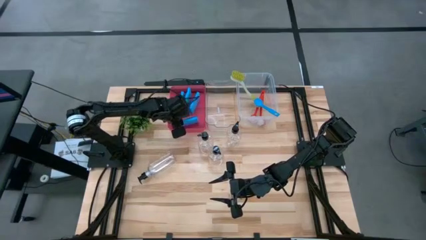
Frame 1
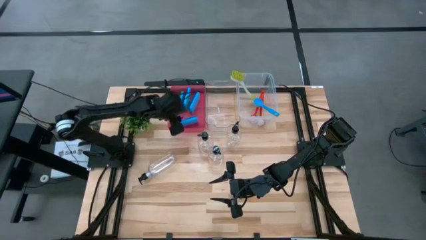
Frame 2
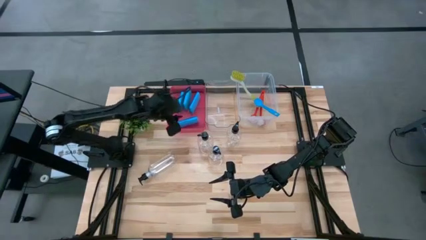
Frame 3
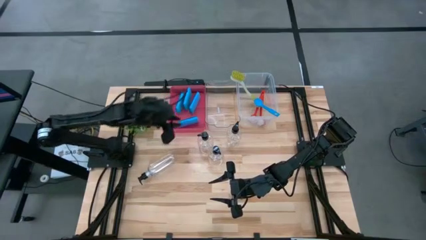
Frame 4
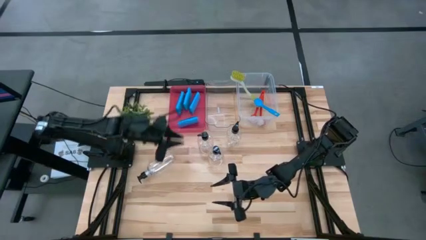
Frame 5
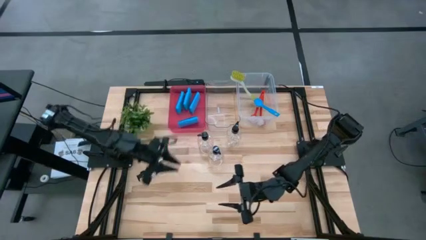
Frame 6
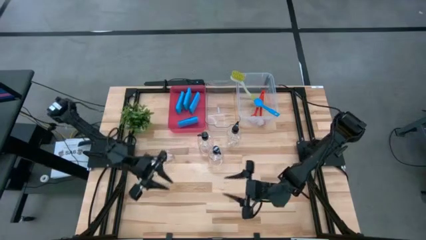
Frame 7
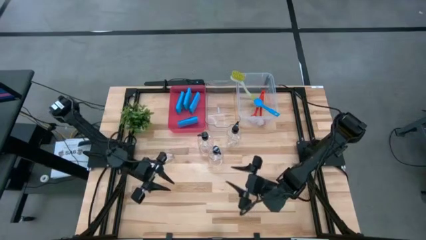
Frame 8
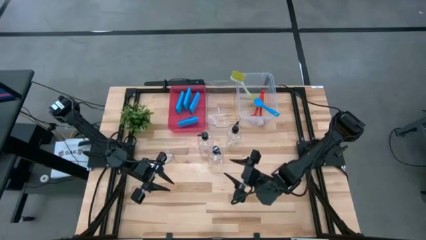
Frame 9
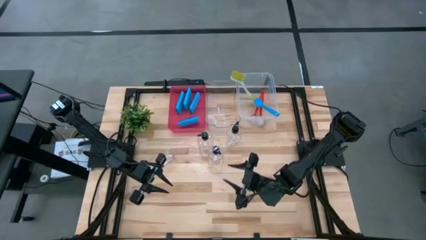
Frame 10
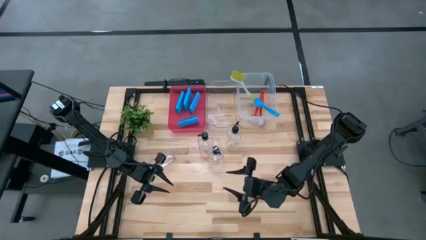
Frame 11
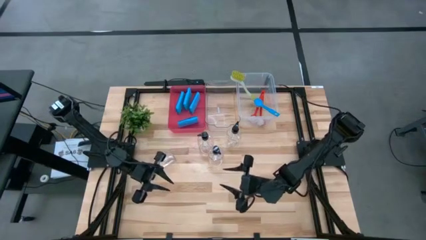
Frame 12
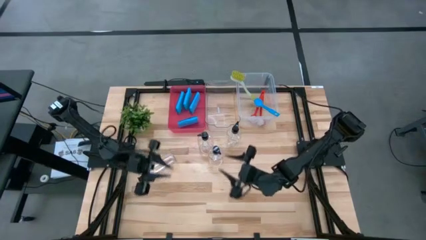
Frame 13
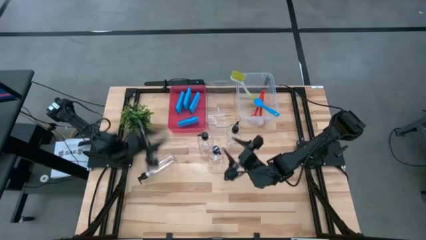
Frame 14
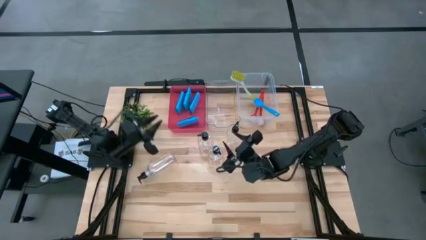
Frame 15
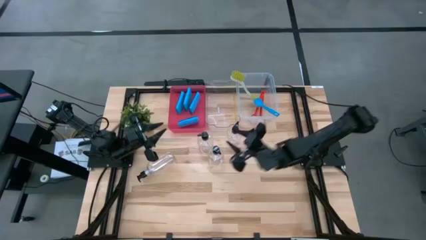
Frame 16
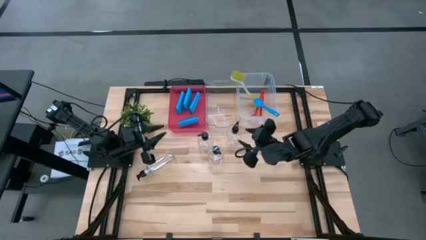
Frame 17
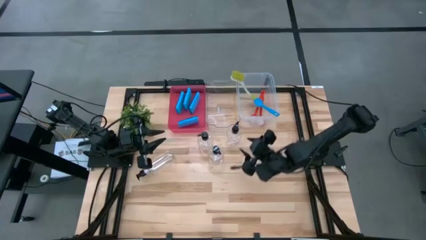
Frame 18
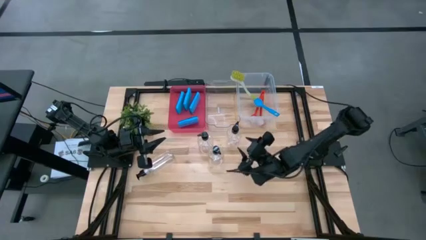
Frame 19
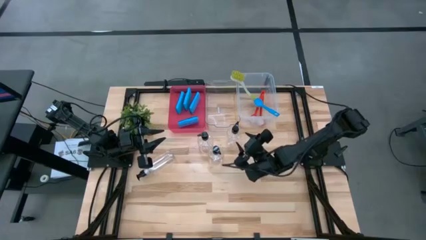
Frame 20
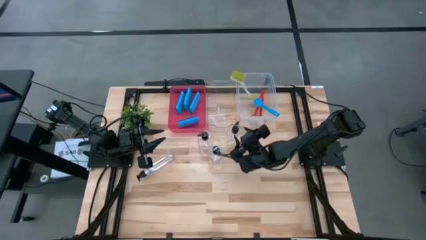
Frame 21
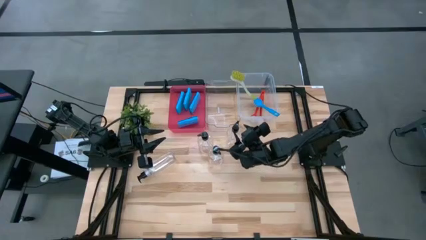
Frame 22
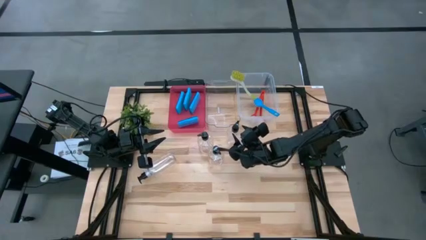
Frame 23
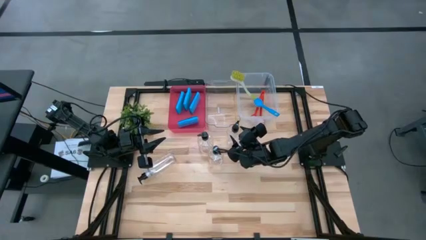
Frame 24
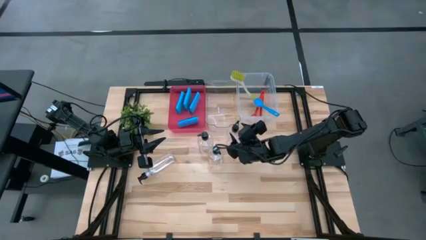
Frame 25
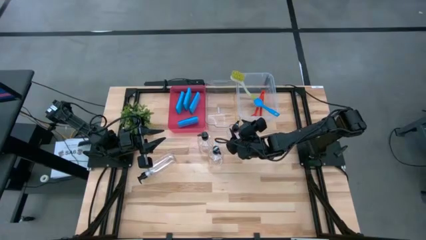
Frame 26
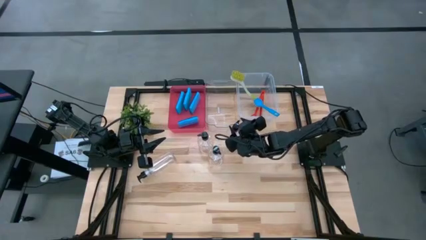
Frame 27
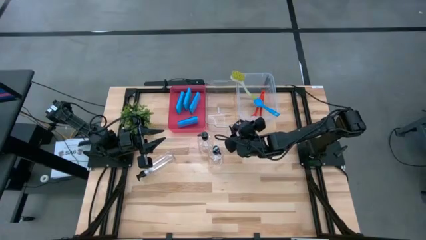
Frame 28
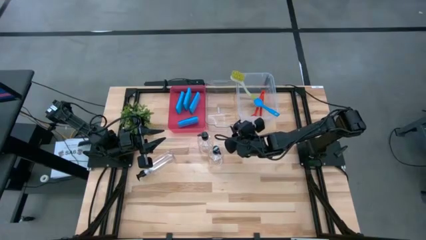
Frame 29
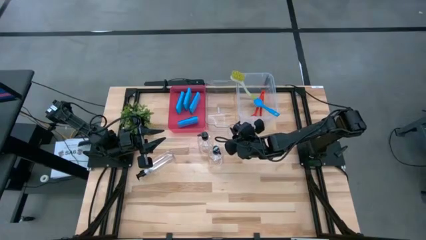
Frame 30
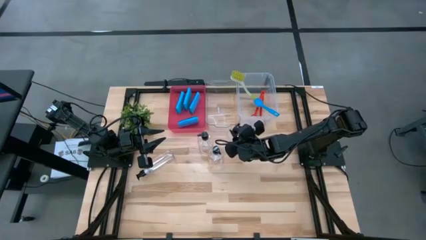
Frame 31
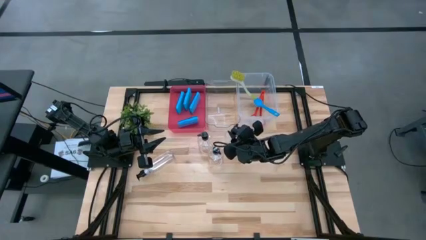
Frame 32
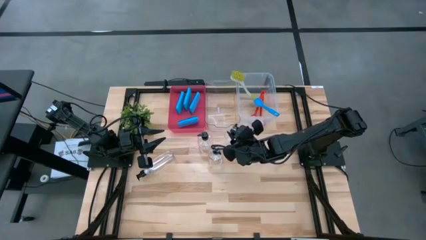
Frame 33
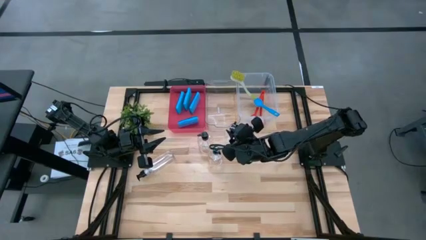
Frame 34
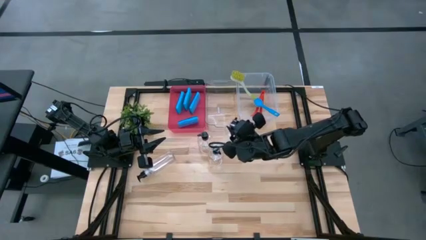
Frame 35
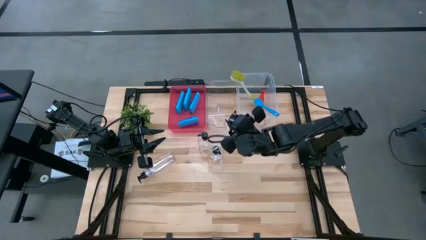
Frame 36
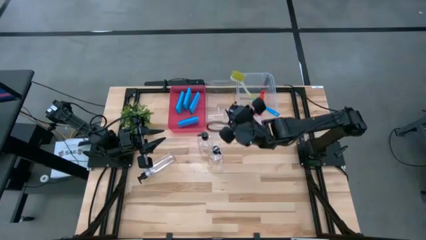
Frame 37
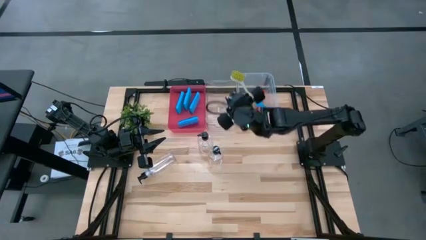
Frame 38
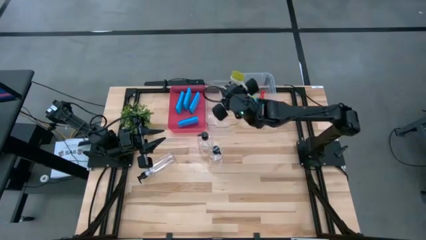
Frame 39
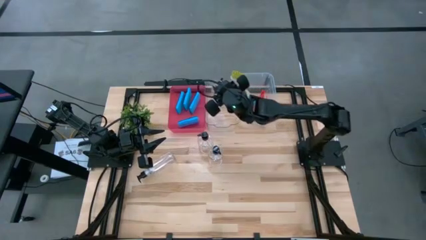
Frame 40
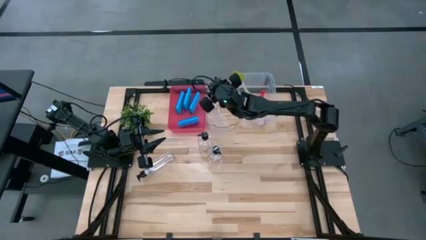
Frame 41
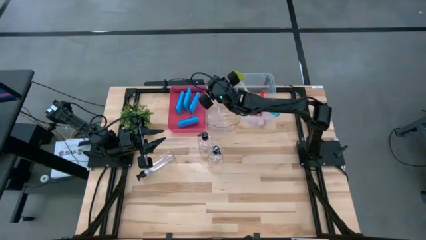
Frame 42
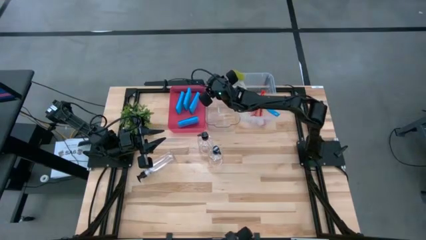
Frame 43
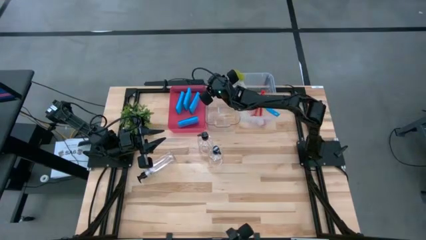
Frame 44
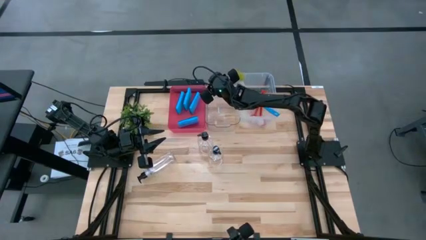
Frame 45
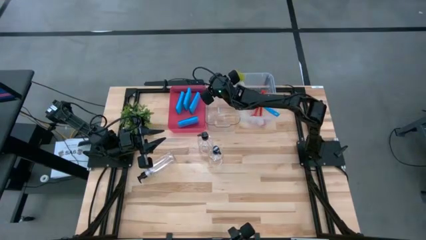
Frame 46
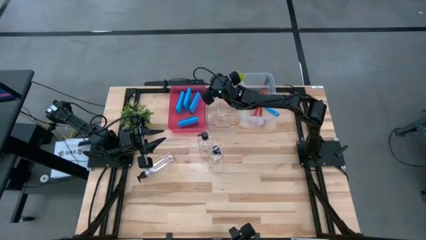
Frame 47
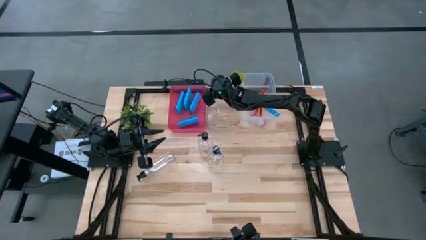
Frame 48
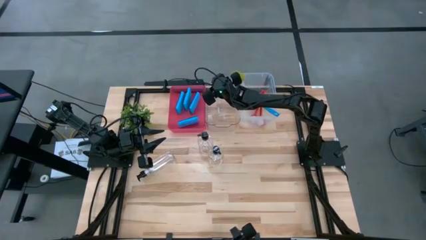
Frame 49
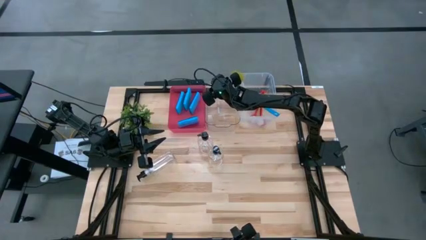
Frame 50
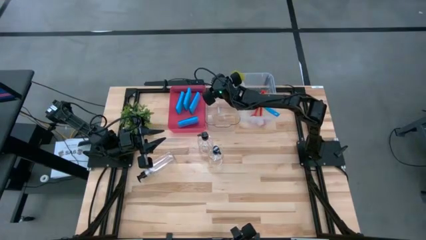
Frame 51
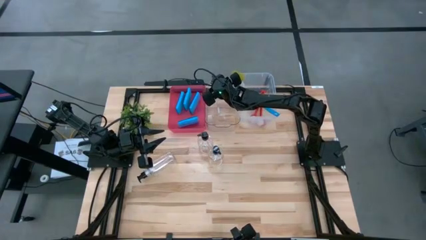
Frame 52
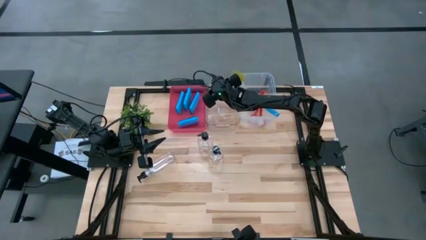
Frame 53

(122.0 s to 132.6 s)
Task: Pick & Place Kitchen Sink Supplies
Put the spray bottle into the transparent bin

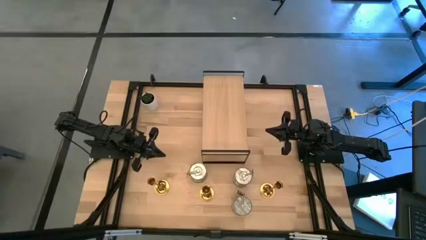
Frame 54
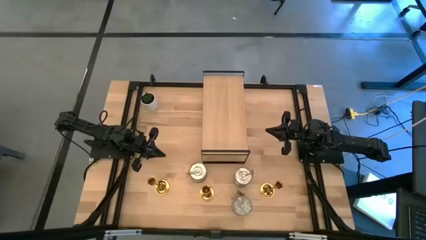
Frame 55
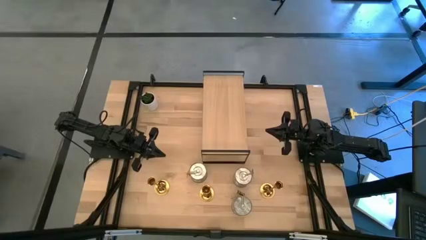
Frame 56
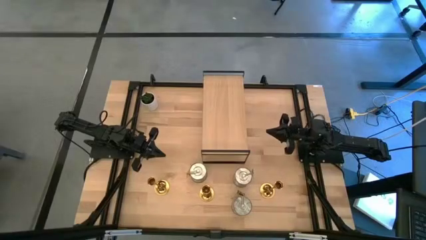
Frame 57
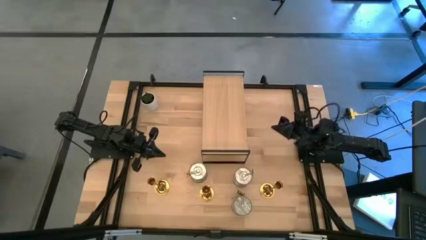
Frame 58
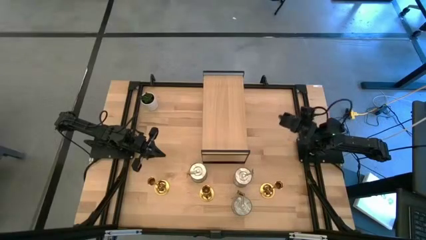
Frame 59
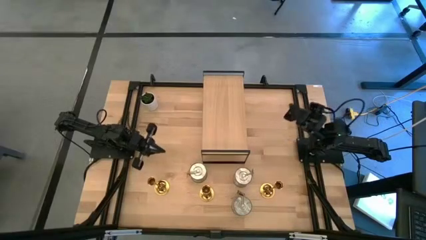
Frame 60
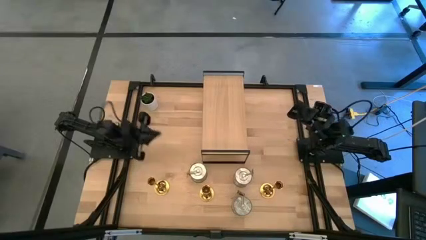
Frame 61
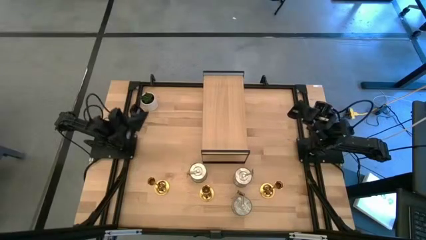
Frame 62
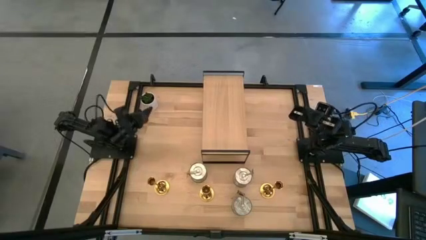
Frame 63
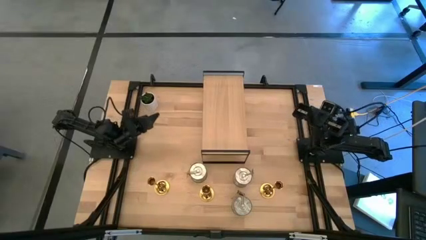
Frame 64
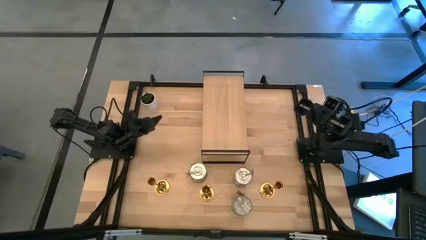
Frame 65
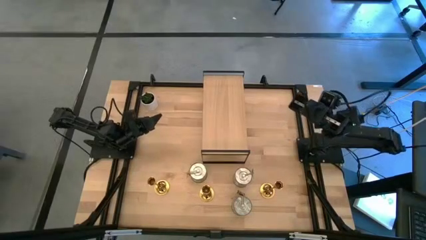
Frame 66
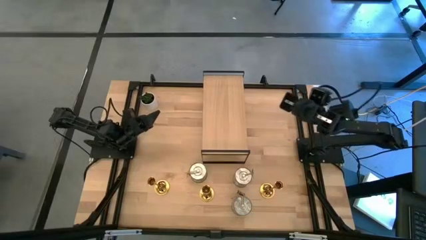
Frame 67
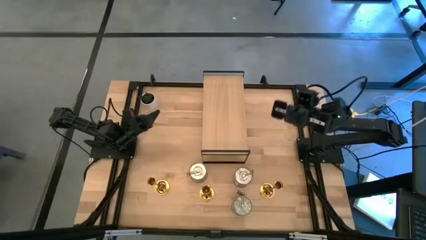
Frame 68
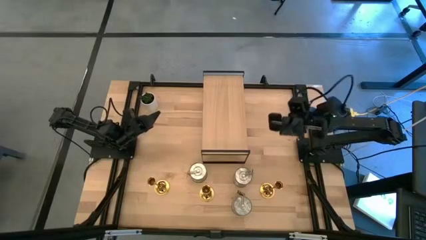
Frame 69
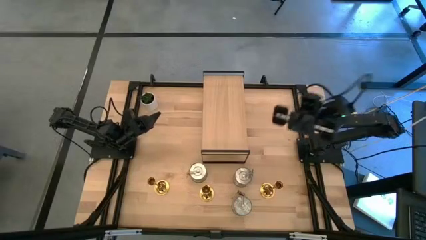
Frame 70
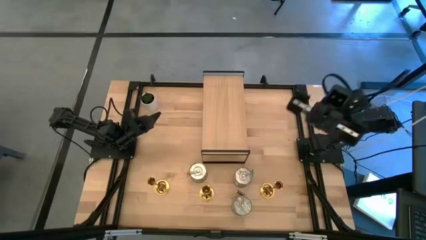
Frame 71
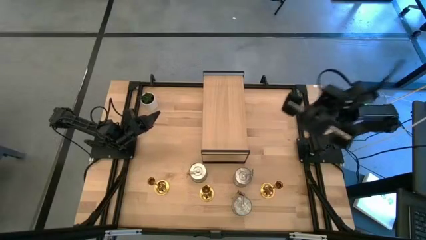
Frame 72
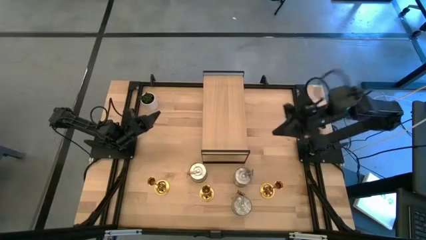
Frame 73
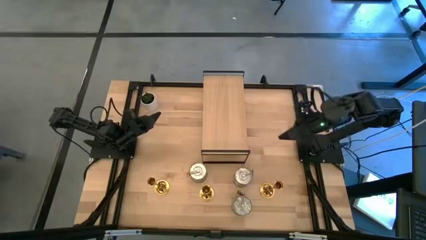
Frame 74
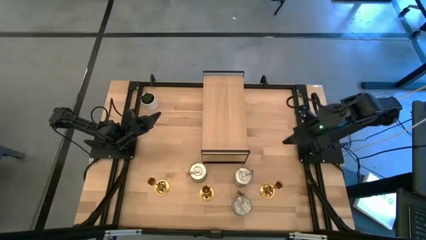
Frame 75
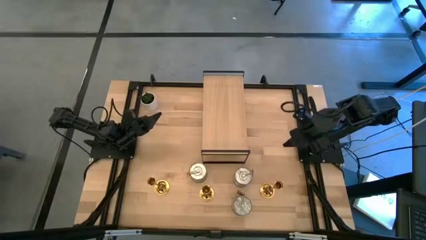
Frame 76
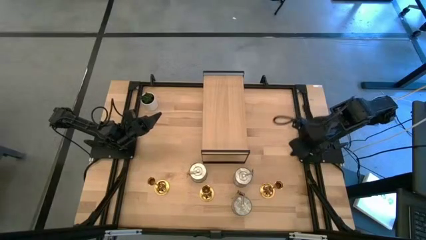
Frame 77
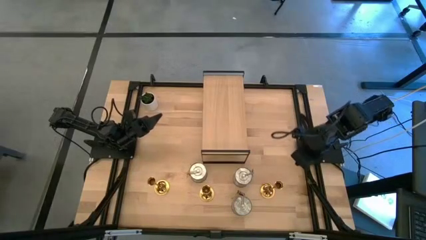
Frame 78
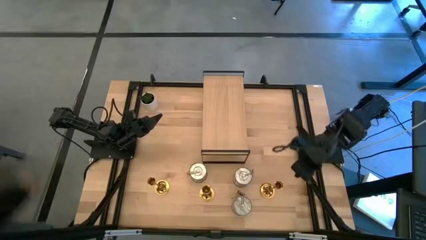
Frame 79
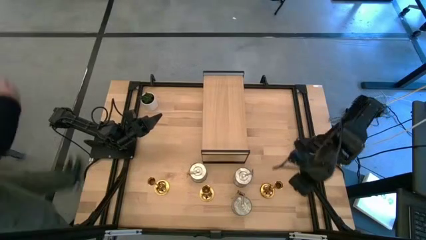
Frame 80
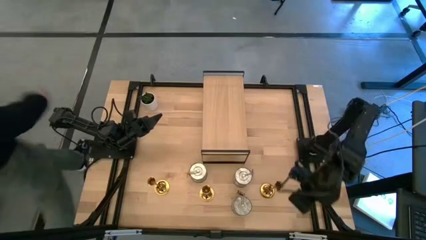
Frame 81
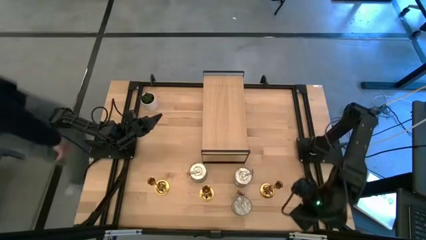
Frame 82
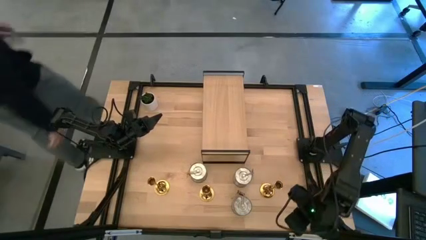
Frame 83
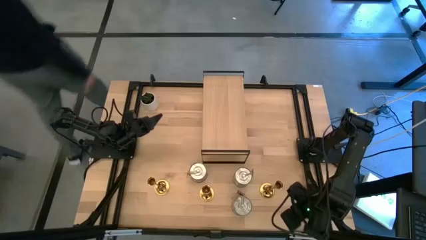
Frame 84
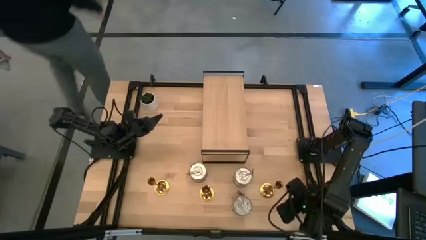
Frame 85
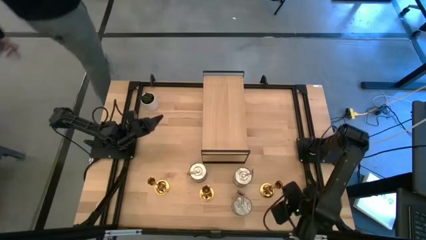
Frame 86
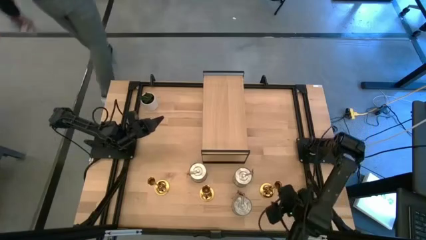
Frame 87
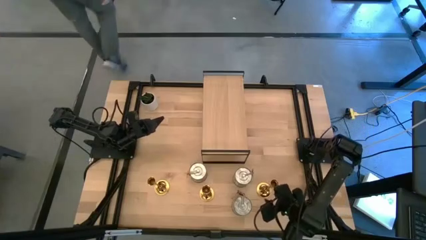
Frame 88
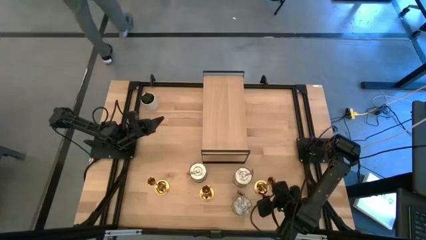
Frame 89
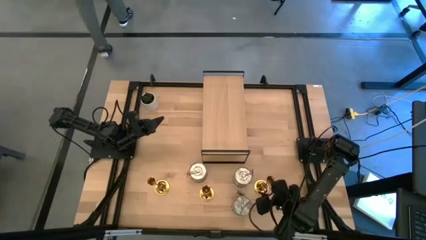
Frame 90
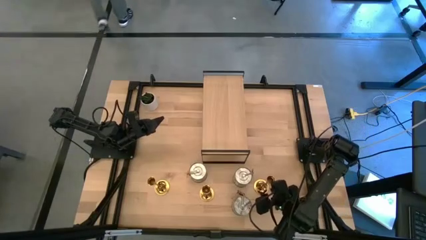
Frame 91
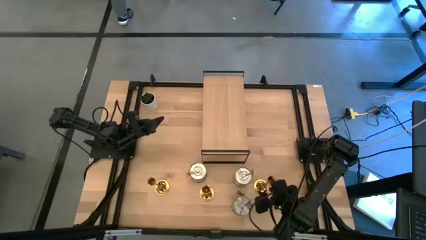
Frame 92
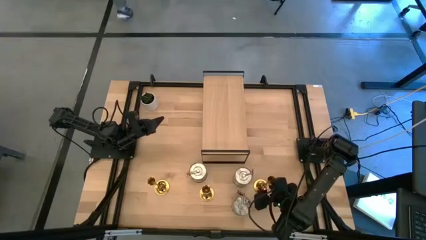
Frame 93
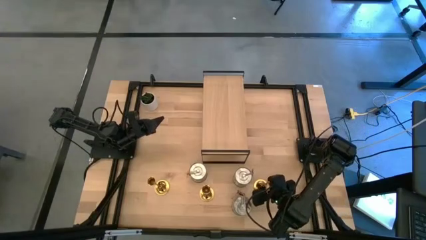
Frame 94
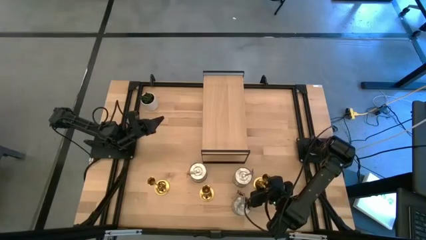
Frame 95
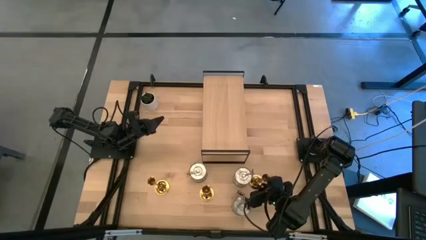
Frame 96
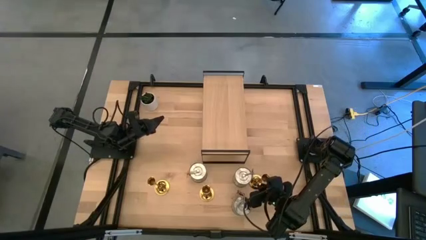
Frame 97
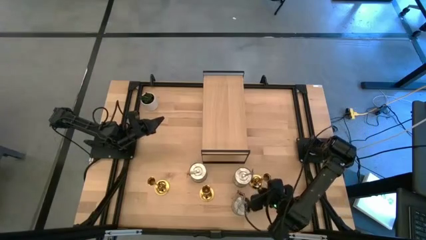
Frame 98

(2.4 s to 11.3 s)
Task: Pick & Place candle stick holders
Put the bottom right gold candle holder on the shelf
